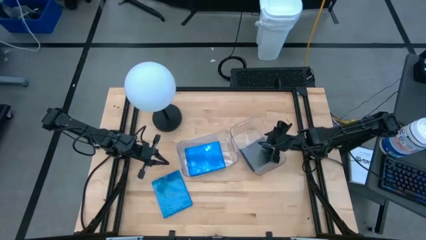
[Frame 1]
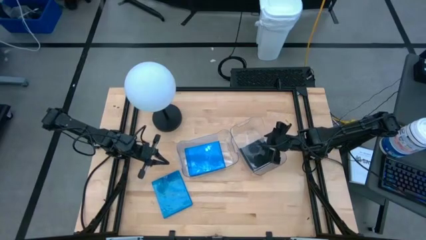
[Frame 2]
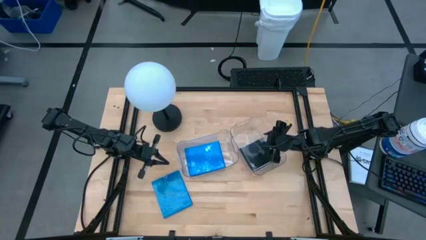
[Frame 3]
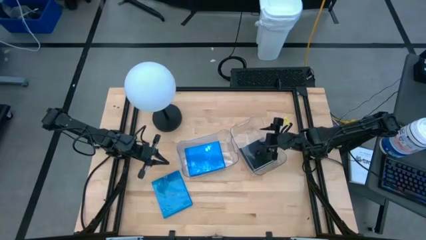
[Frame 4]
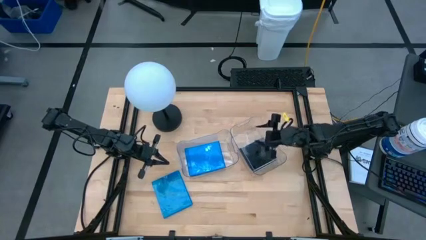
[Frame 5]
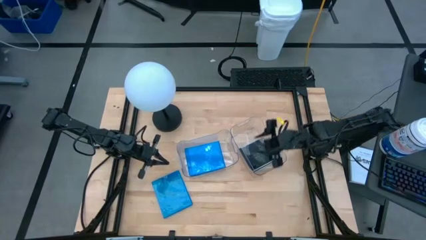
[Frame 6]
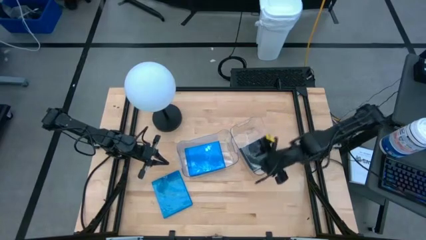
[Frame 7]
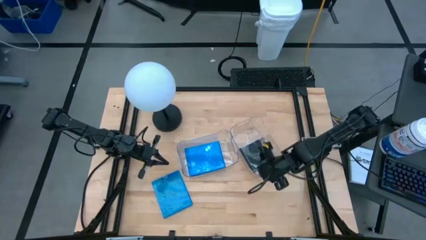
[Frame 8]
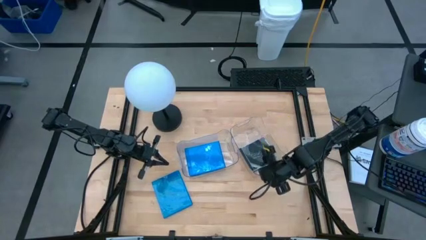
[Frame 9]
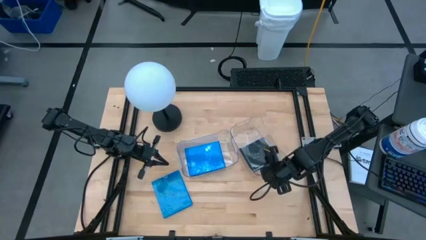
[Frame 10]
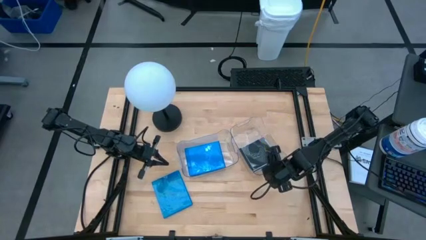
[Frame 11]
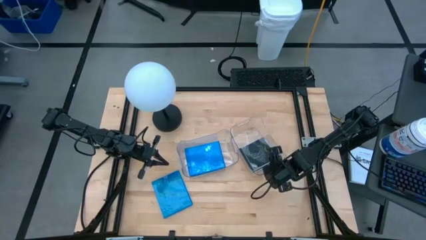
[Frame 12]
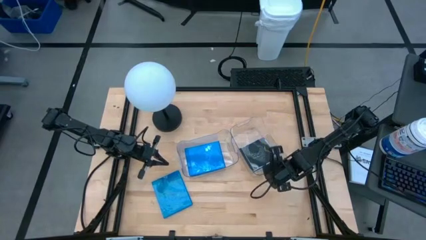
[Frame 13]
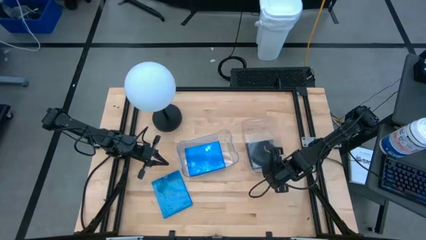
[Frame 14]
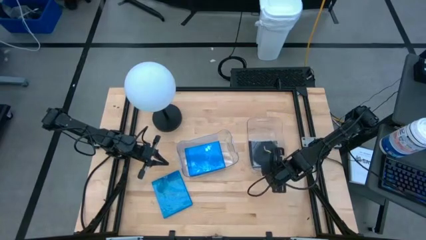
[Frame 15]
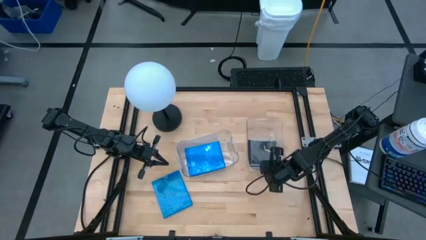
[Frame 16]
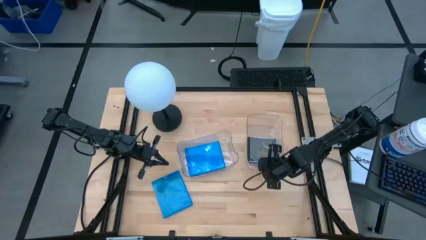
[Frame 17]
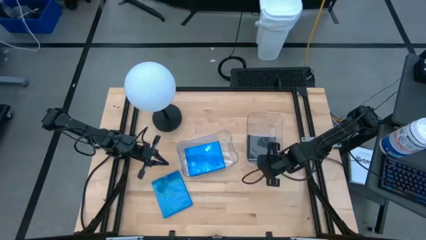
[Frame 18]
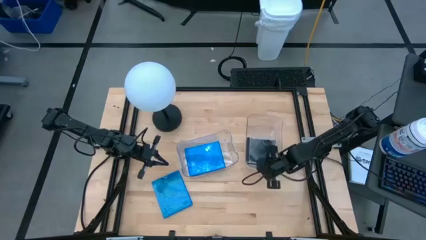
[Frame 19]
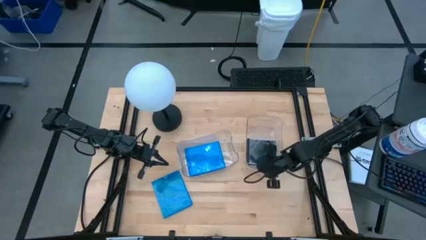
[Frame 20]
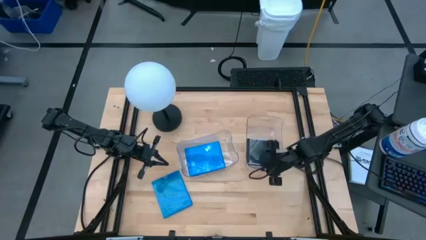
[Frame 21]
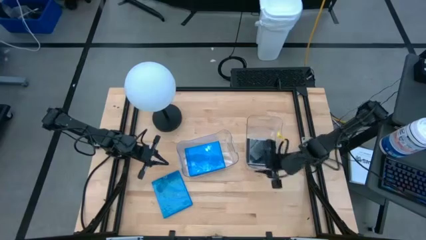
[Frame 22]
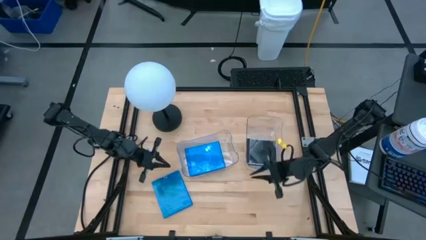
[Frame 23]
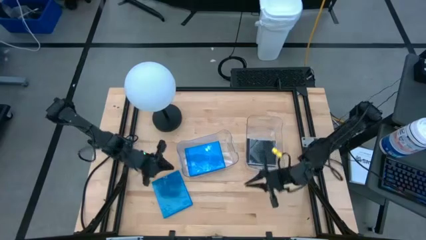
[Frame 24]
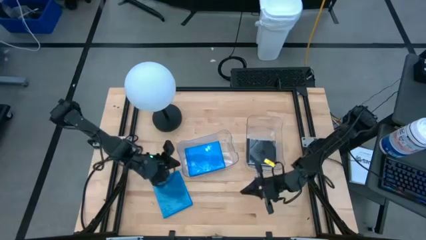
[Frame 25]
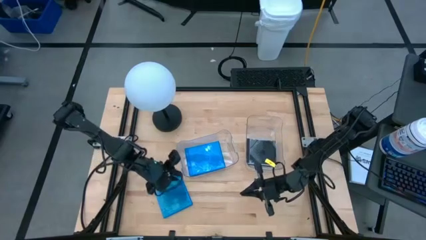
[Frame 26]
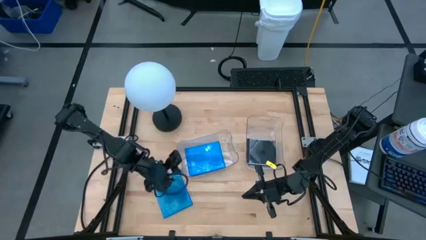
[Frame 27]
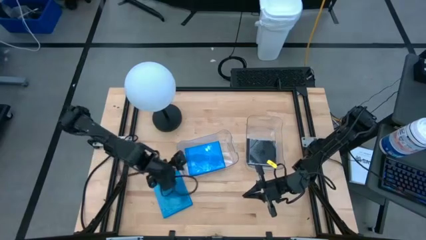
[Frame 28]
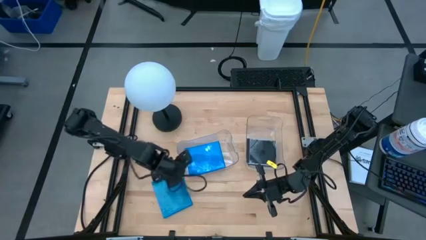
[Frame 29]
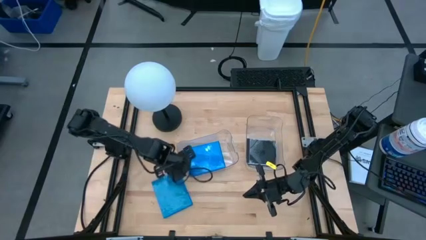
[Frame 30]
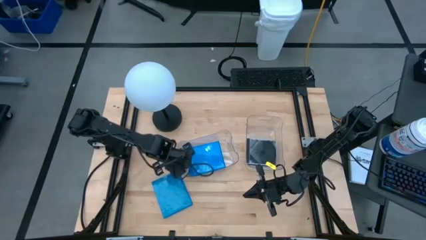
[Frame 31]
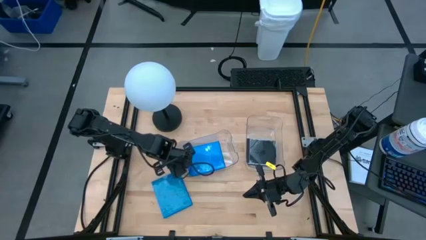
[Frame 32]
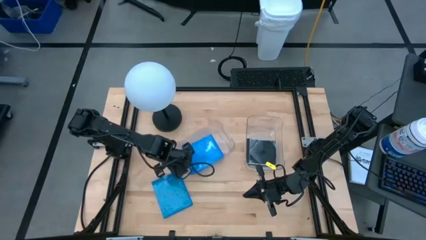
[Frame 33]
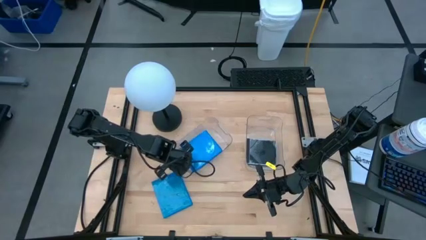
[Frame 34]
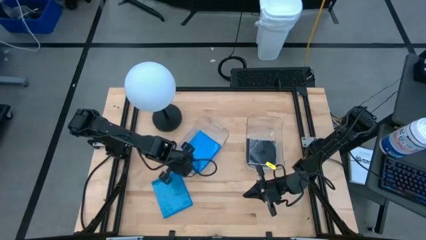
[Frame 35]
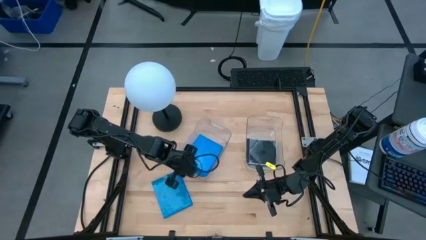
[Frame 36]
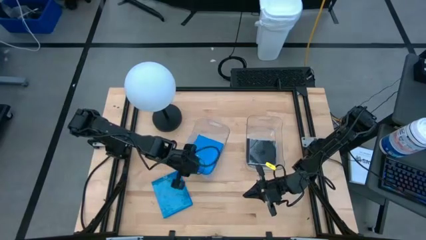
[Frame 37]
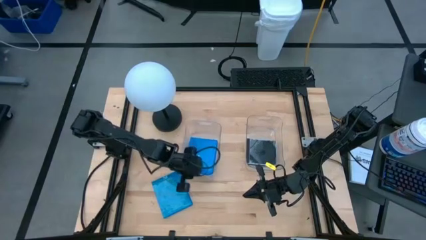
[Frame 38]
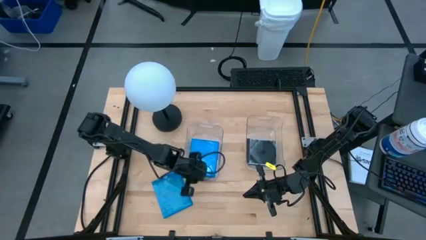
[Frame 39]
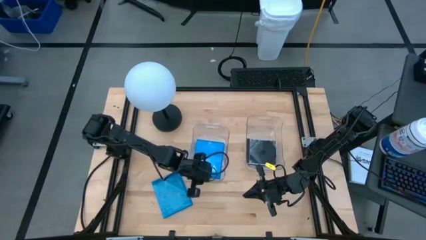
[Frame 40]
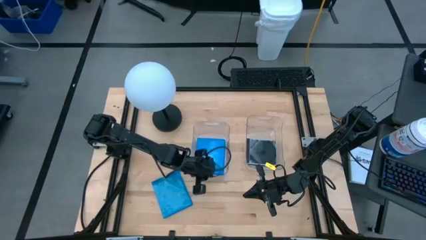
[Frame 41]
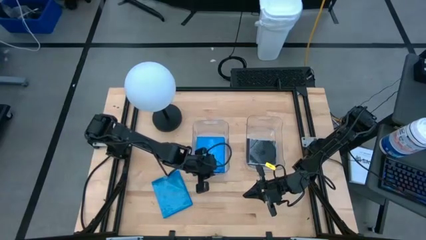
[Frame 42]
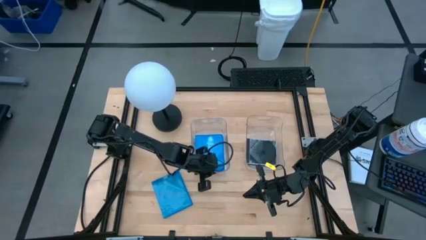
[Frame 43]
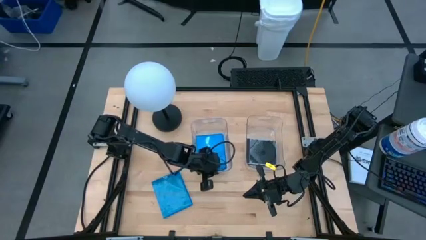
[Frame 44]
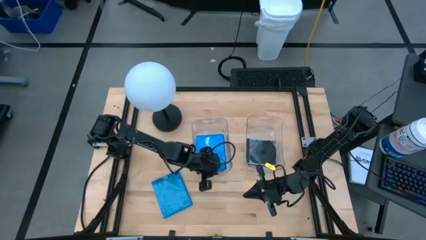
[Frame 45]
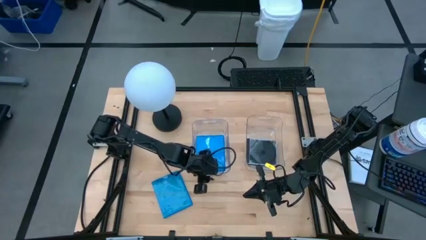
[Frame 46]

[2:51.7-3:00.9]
Task: Pick & place jewel cases by type
Adjust the bins

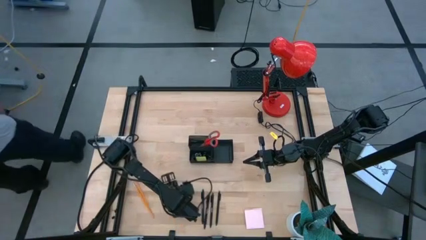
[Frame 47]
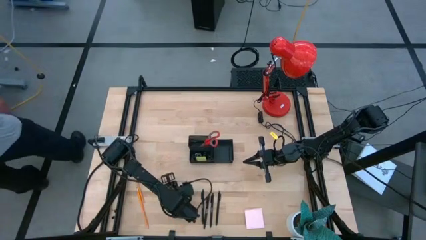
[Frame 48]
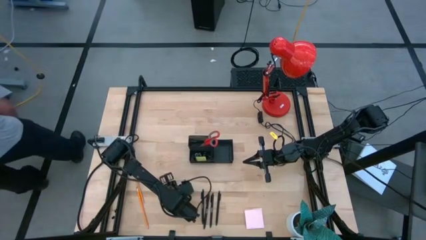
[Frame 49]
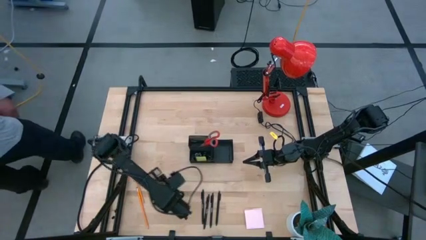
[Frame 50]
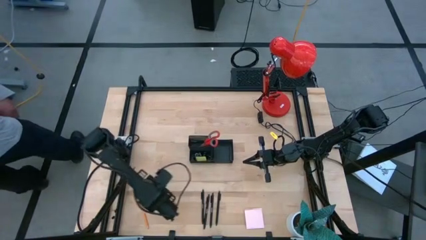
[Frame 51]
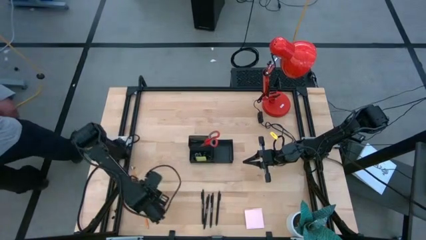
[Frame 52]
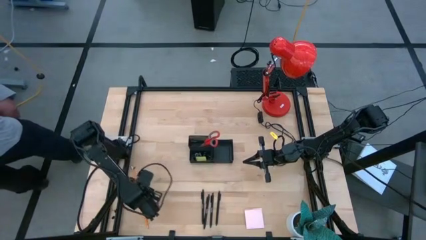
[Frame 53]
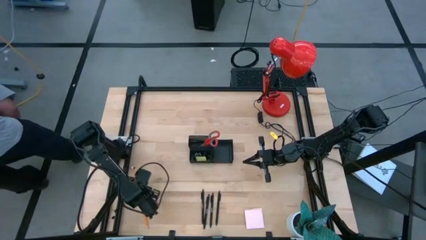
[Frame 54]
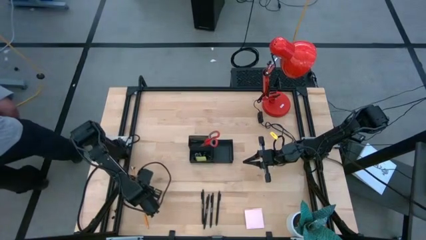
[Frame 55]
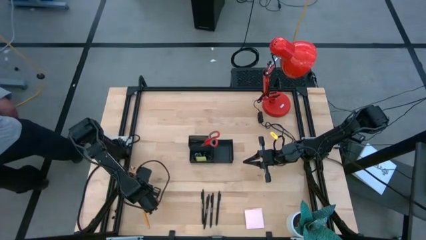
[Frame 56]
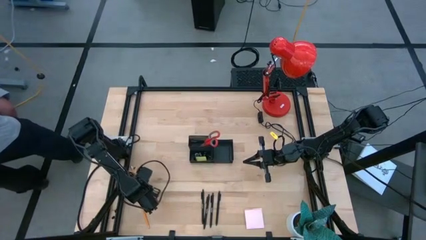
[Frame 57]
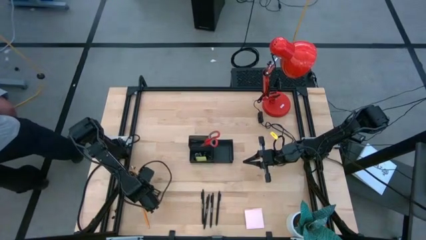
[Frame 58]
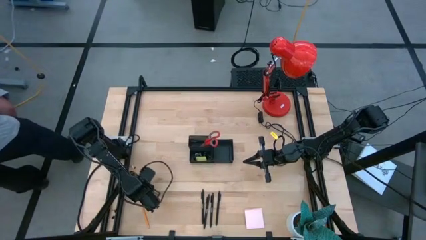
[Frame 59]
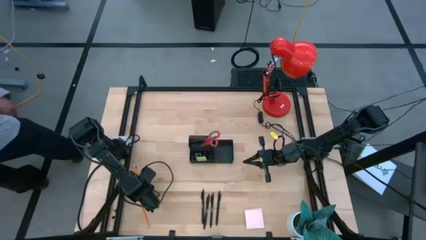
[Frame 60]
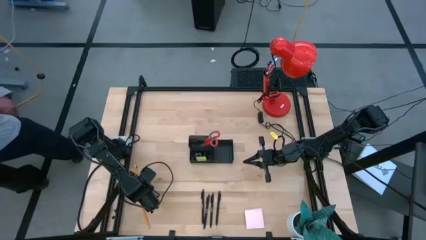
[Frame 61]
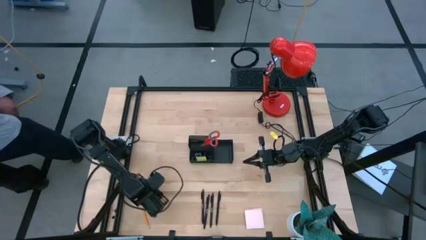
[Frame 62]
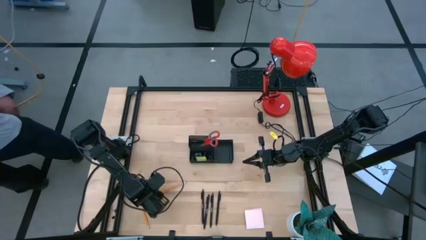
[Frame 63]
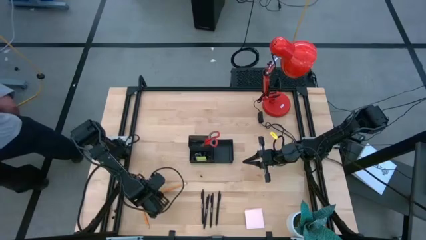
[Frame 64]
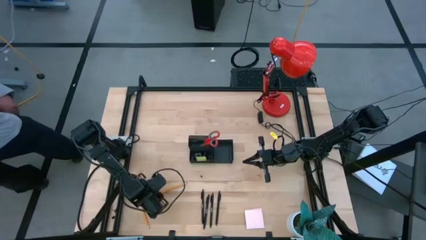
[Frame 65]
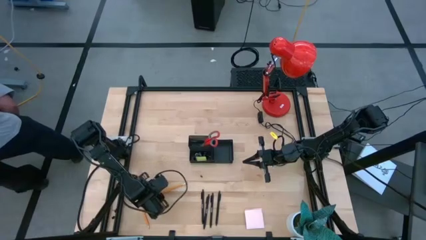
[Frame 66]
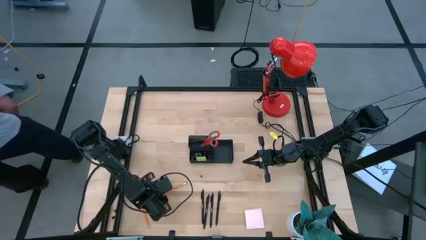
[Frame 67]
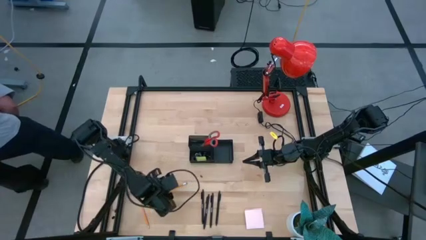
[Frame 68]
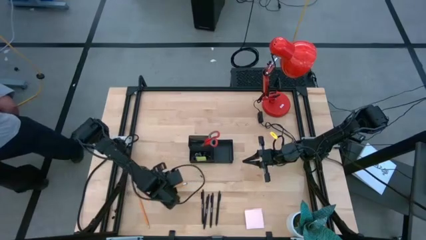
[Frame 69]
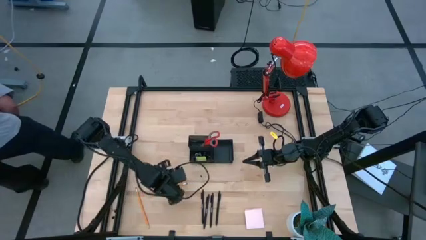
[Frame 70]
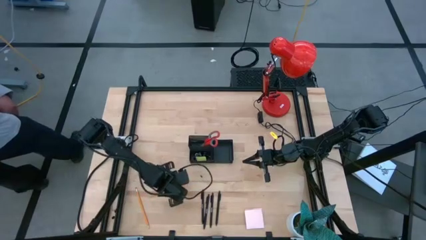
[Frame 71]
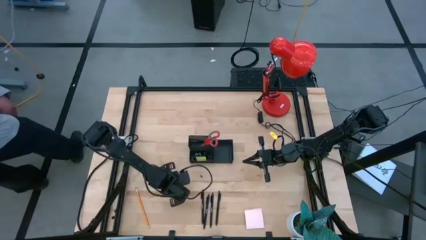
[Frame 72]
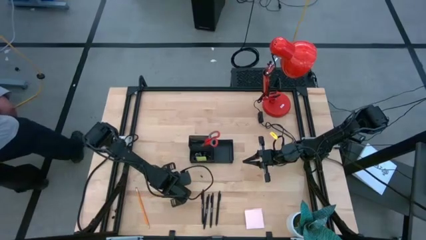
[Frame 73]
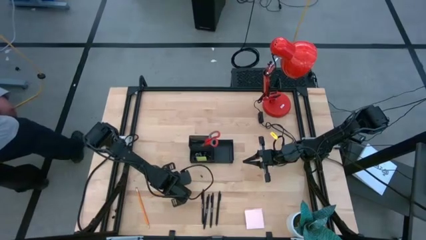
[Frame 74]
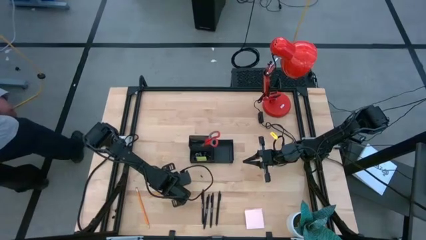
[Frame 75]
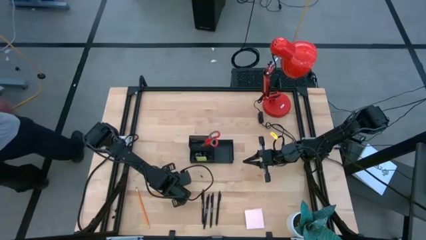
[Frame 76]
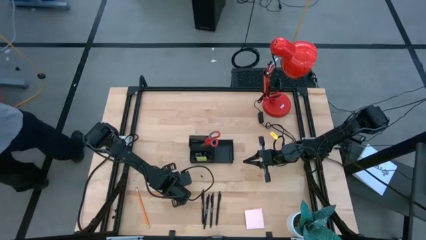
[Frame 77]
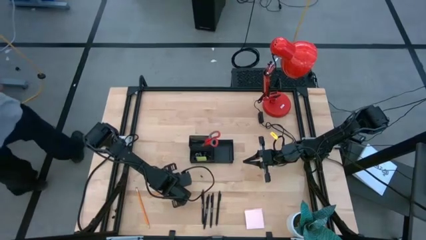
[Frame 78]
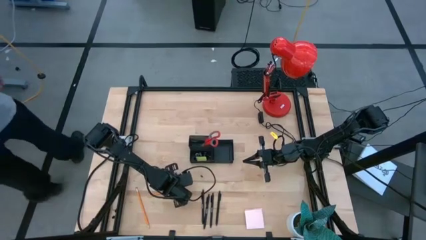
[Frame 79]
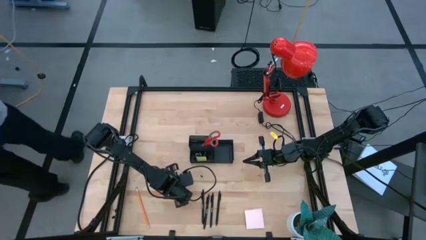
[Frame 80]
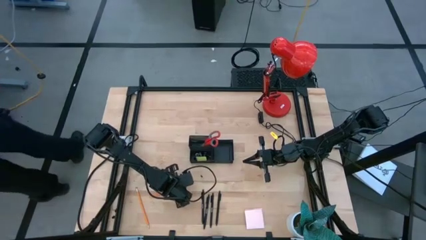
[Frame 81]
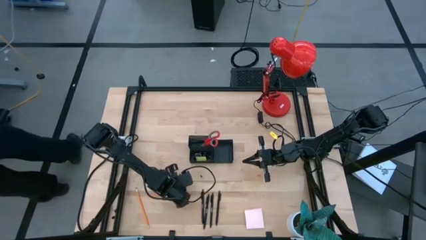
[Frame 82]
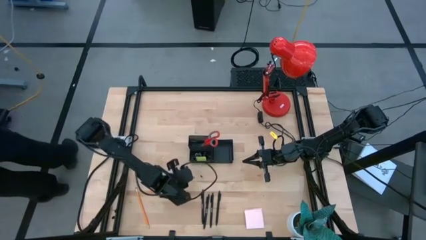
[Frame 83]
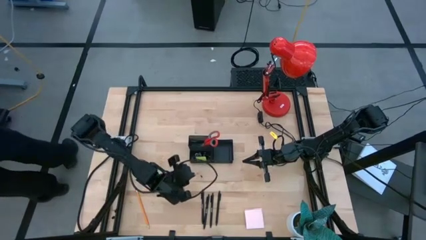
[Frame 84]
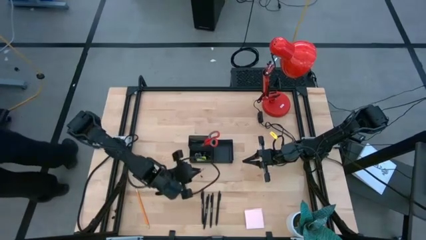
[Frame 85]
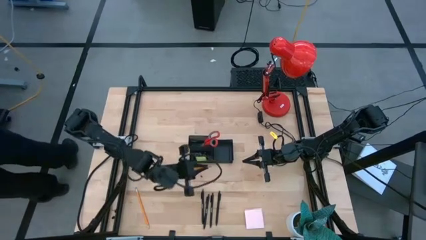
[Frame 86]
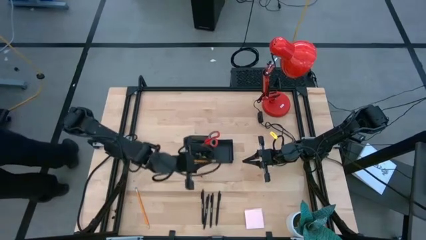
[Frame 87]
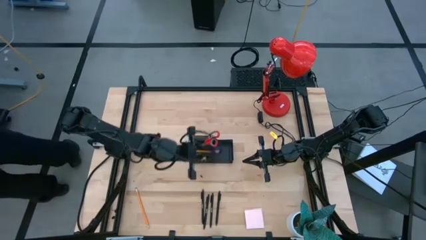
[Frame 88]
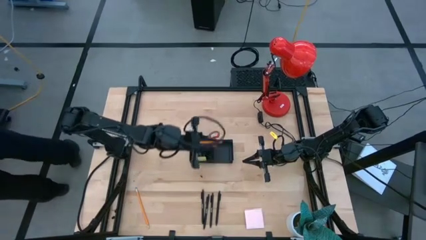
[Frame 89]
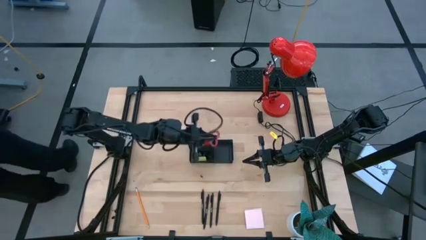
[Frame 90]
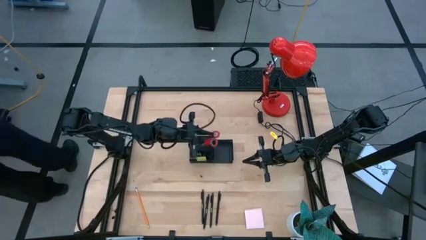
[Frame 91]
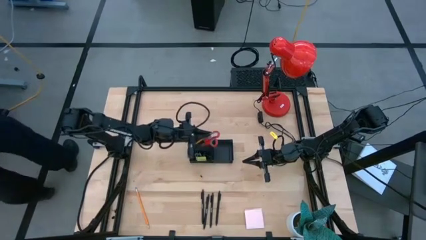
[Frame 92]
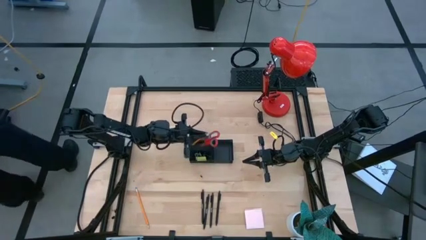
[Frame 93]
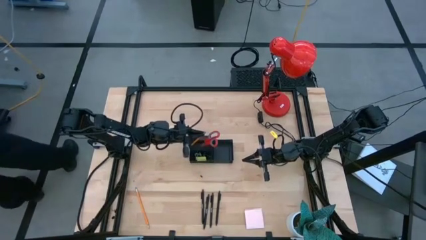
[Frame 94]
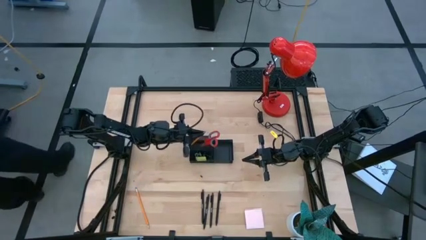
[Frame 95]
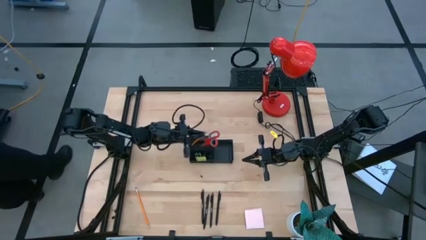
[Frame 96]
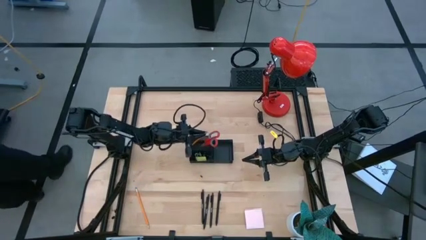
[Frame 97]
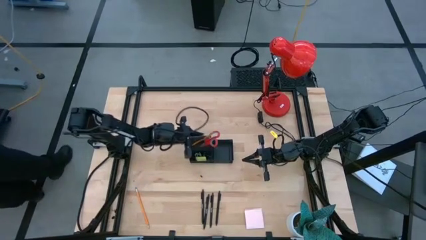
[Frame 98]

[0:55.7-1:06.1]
Task: Pick and place office supplies into organizer
Put the orange pencil into the black desk organizer
